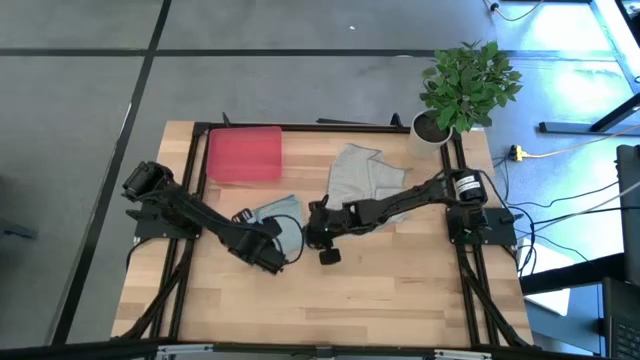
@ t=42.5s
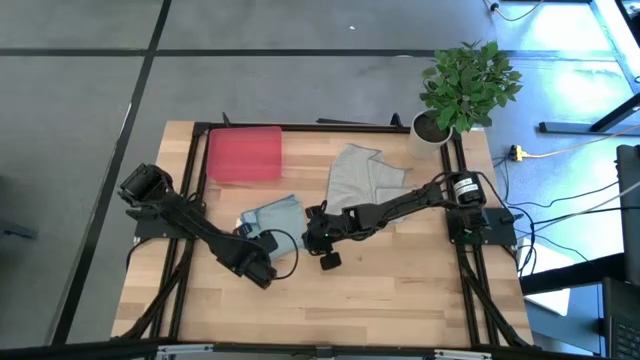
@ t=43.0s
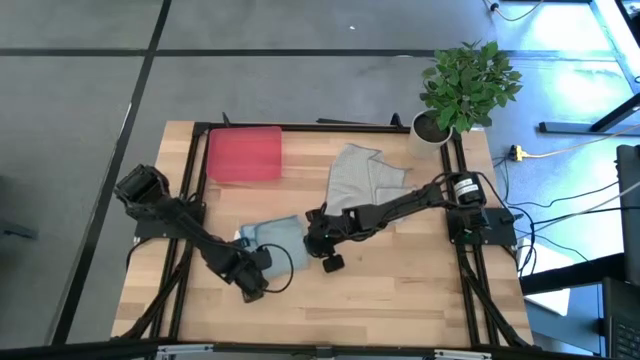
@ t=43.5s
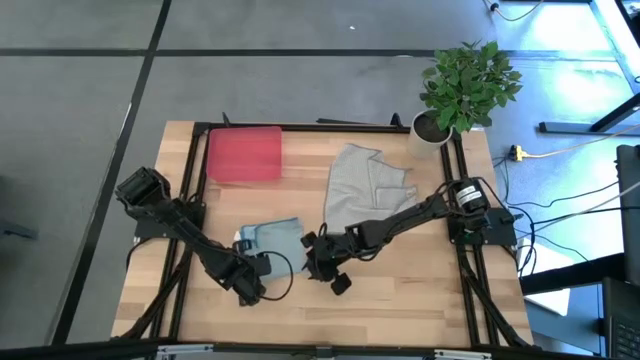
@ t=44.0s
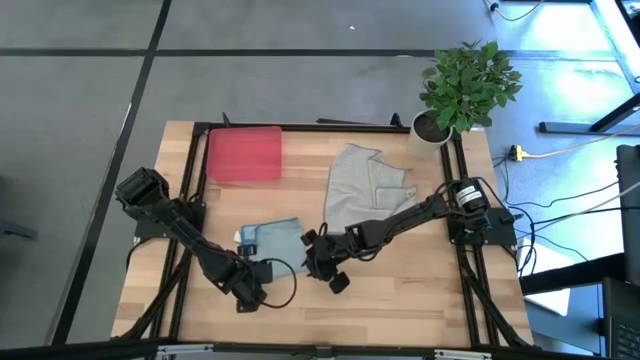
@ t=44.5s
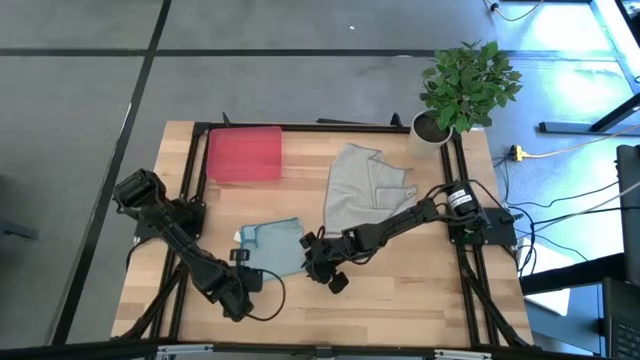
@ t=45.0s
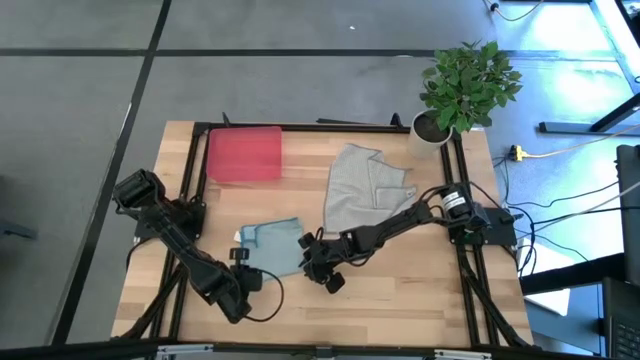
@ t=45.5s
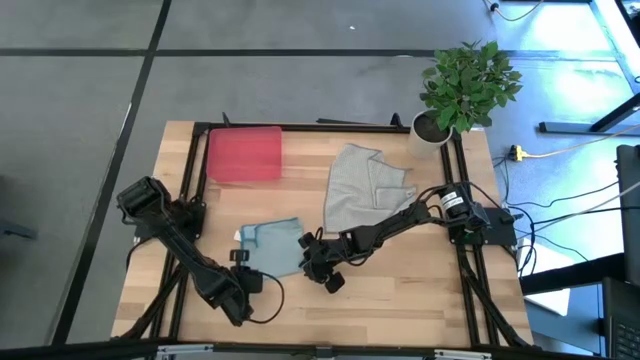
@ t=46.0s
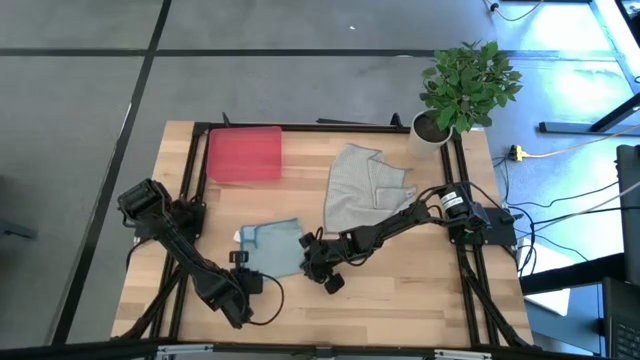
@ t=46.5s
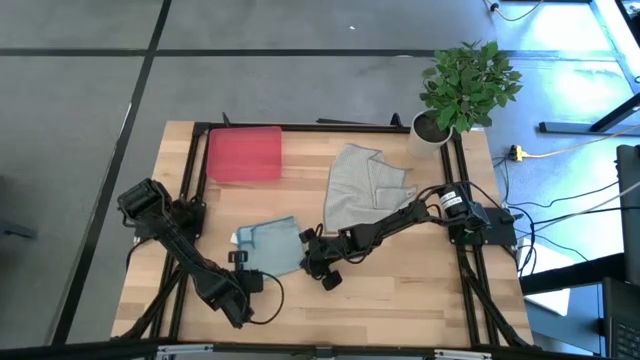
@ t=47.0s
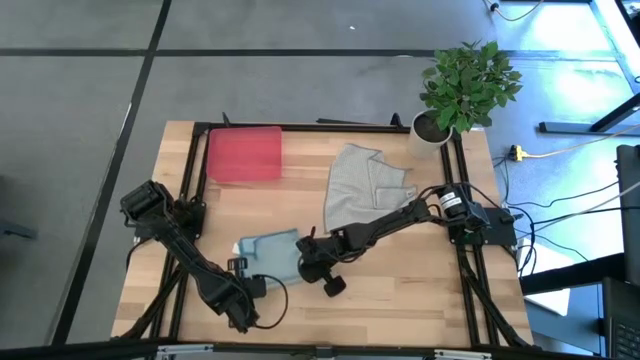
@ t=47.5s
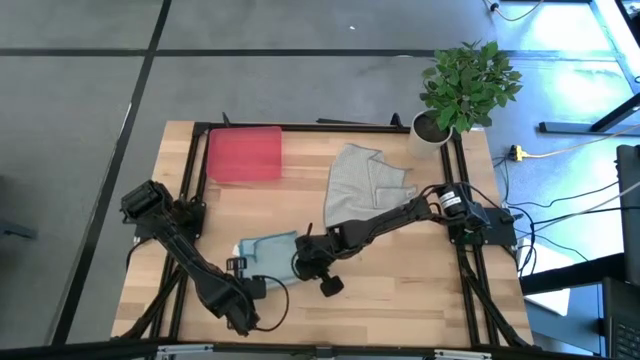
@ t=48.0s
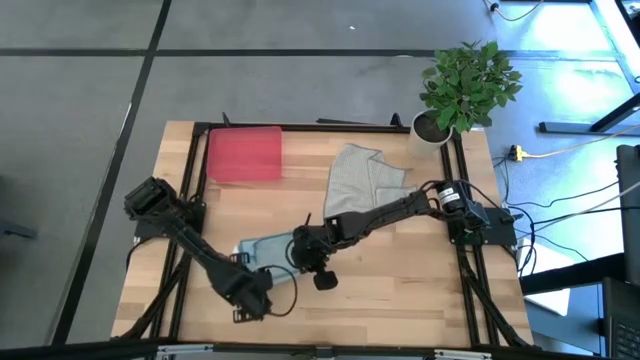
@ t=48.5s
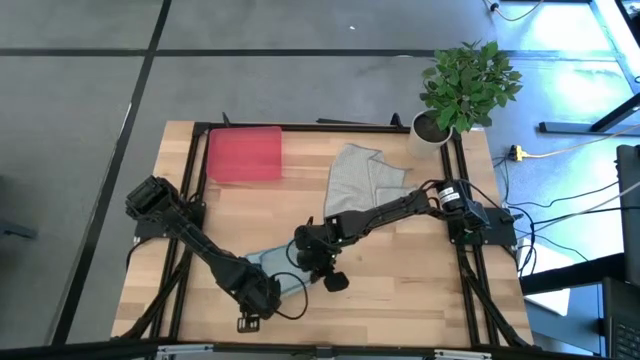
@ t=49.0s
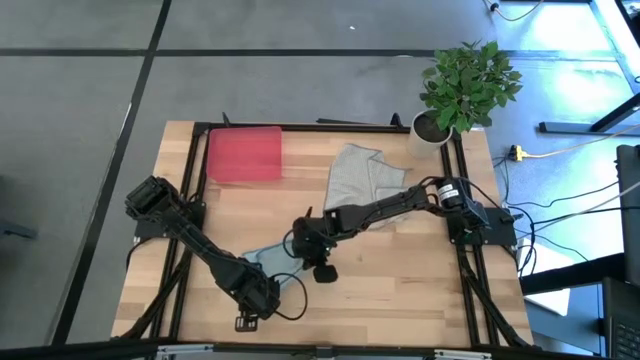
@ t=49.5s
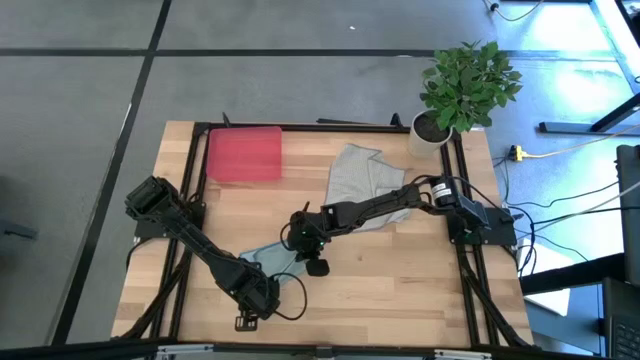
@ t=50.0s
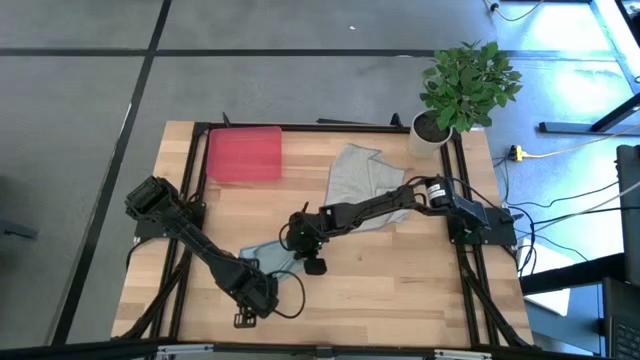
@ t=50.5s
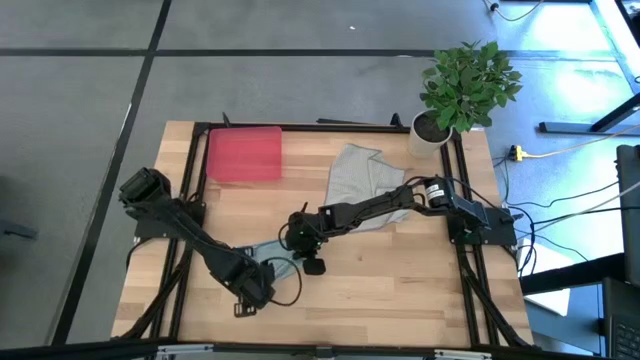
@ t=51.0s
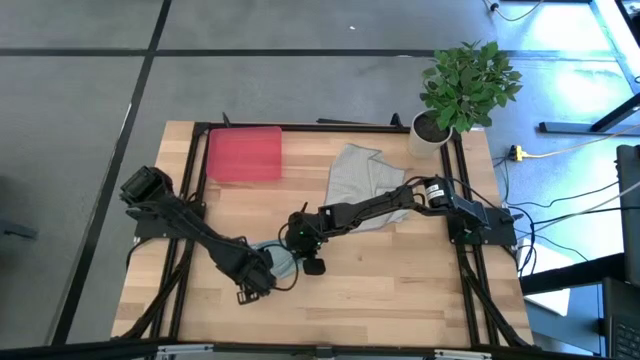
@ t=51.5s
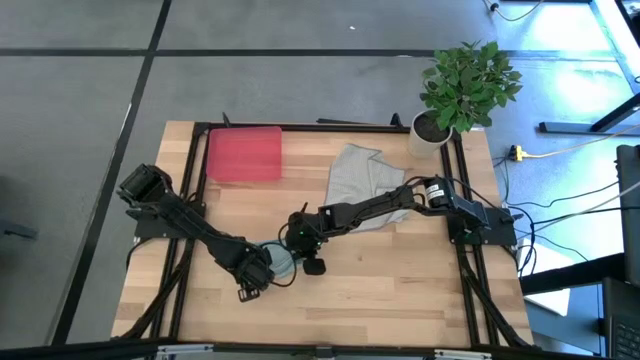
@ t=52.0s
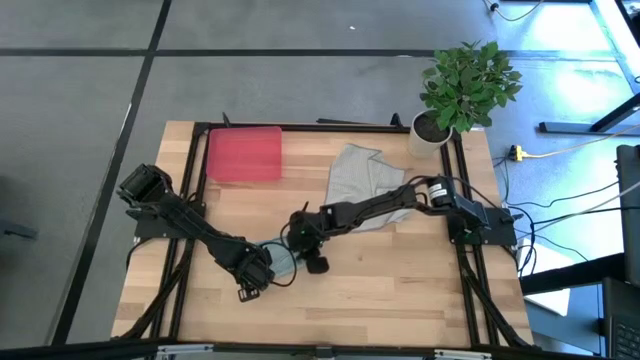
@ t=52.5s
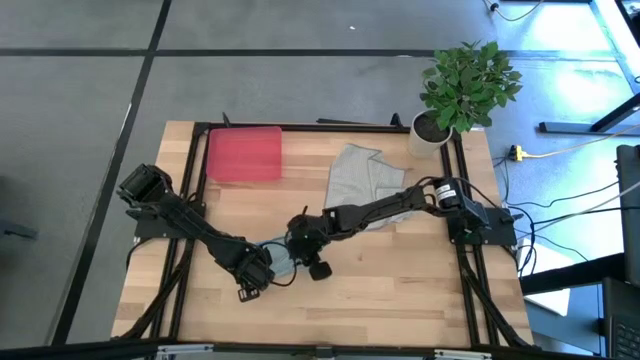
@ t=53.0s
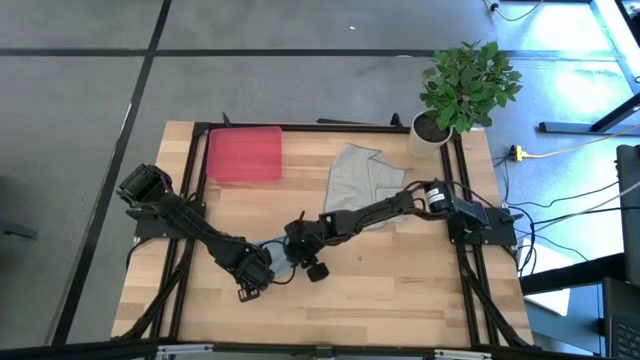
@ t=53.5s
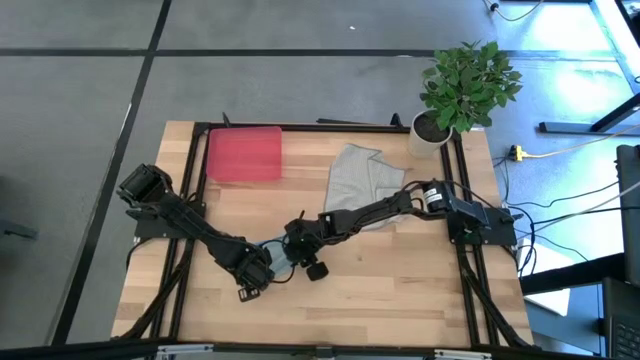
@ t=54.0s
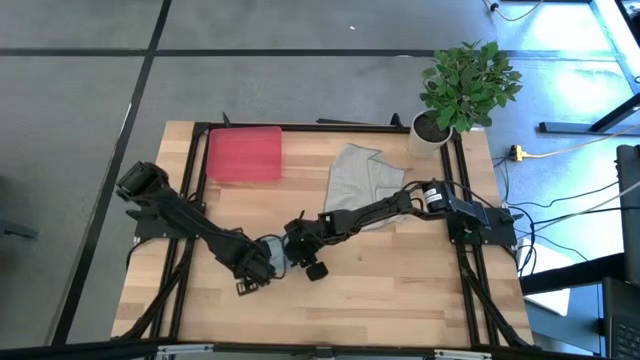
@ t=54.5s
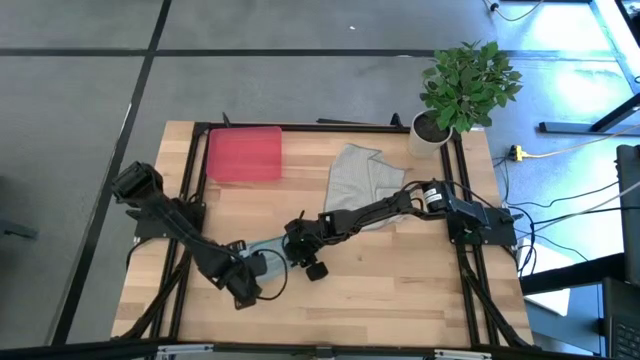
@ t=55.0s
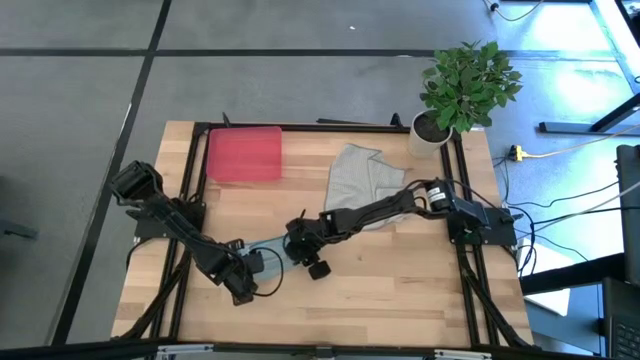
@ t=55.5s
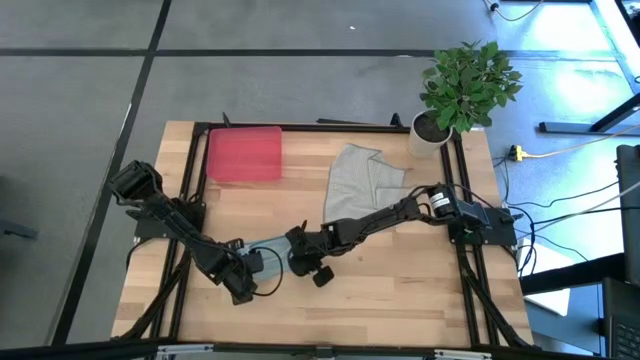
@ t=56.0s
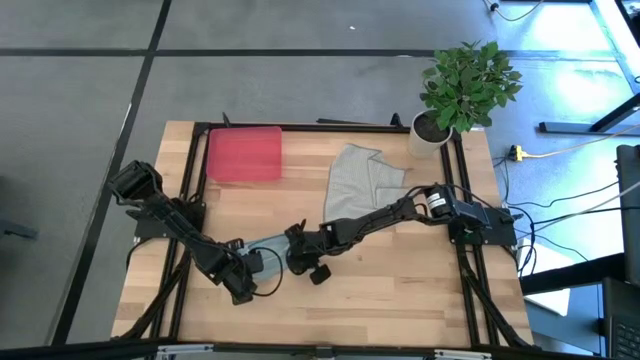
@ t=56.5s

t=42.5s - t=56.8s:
Task: Roll microfiber towels into tight, uniform cylinder then place into a basket
Roll the blue towel

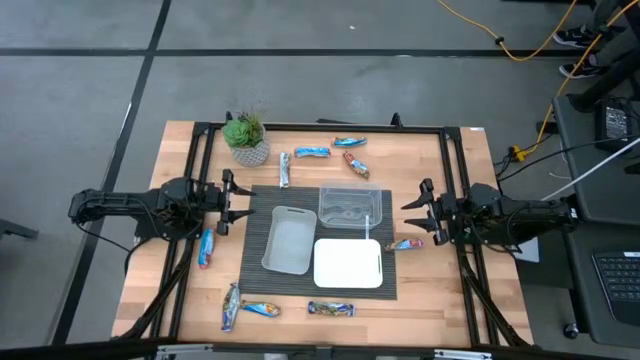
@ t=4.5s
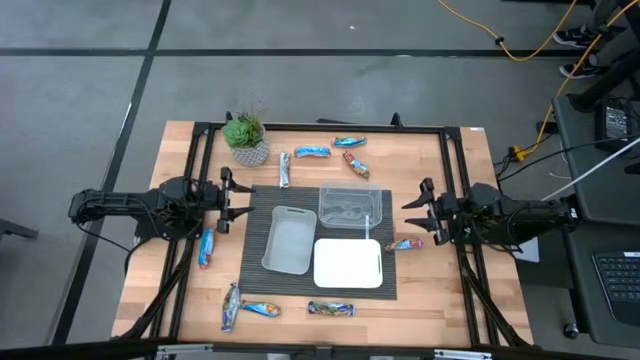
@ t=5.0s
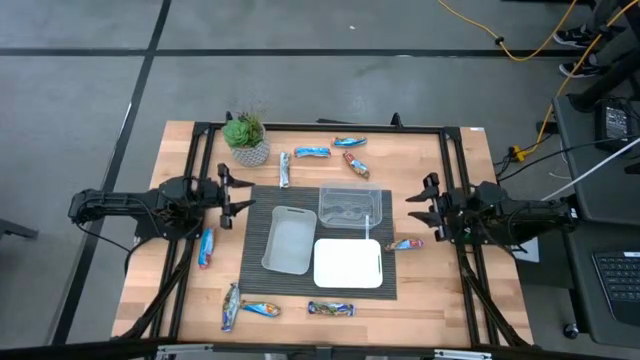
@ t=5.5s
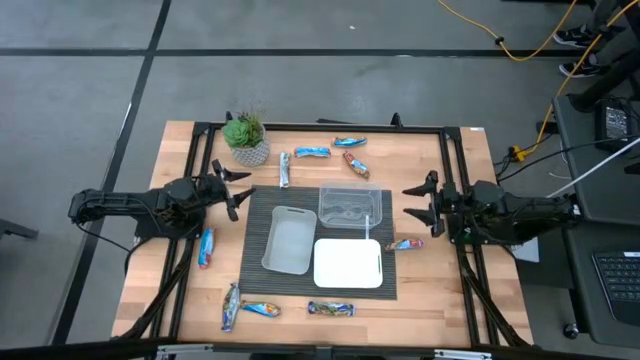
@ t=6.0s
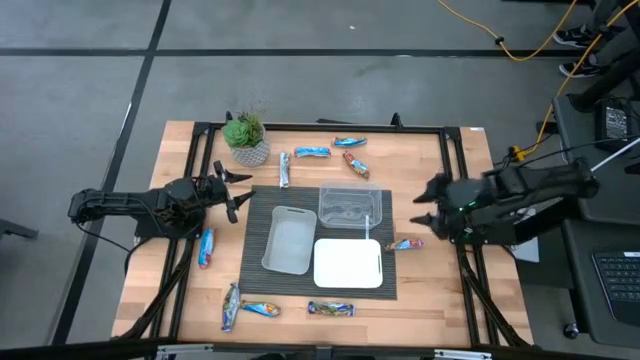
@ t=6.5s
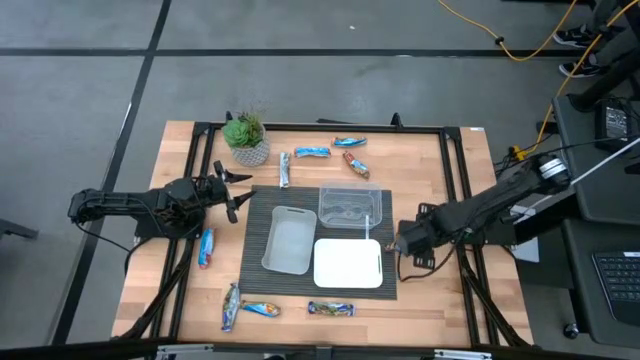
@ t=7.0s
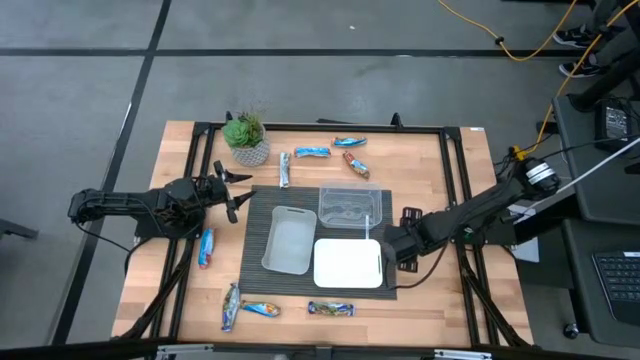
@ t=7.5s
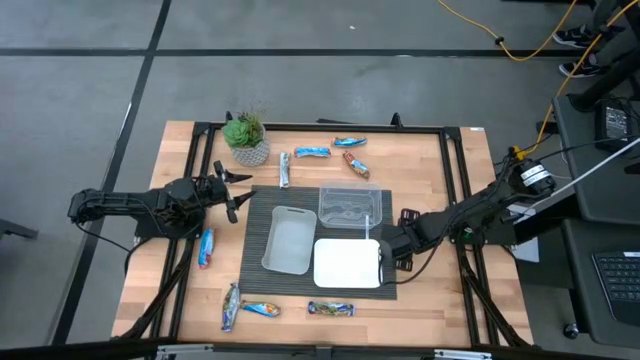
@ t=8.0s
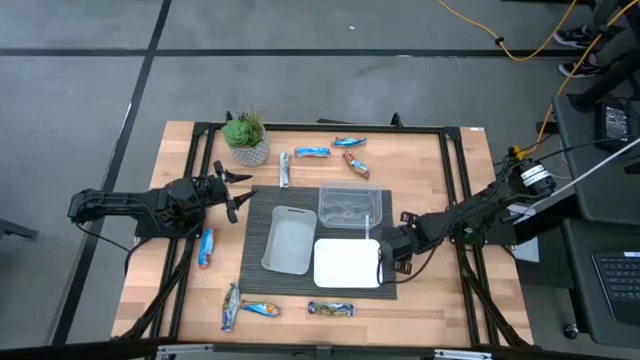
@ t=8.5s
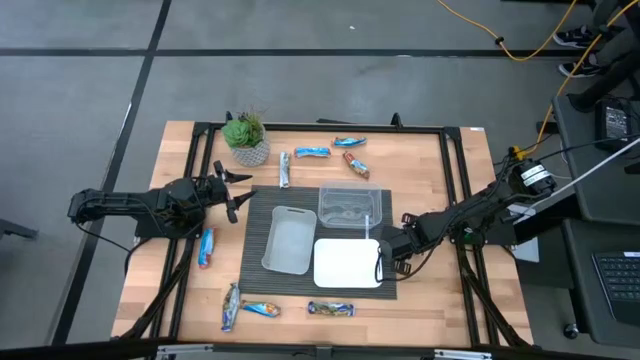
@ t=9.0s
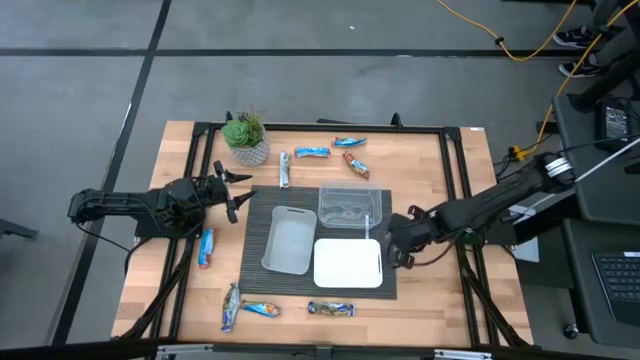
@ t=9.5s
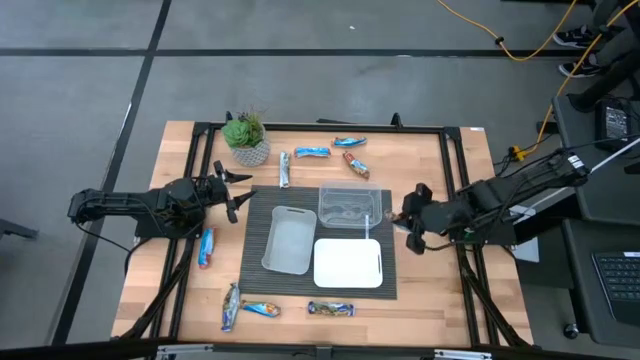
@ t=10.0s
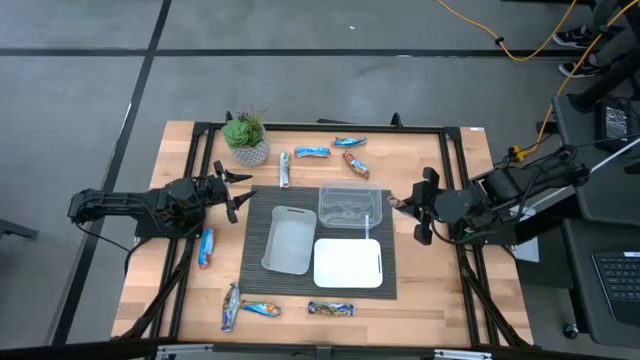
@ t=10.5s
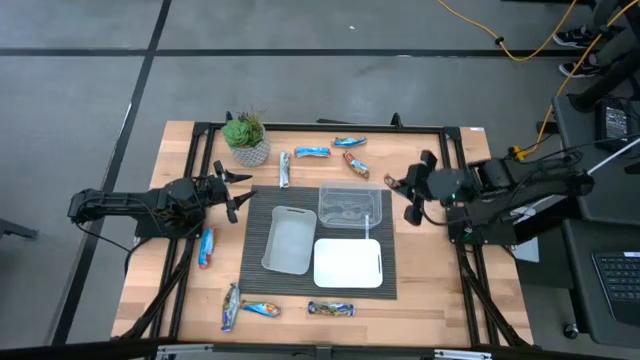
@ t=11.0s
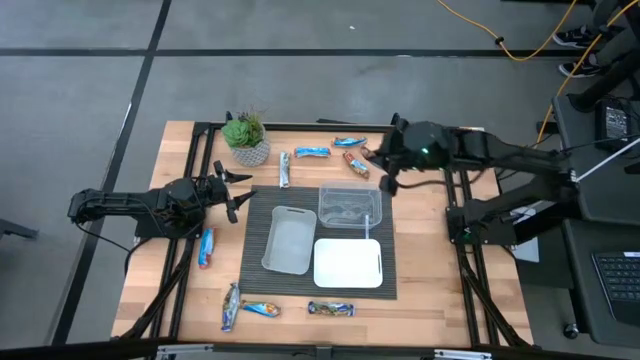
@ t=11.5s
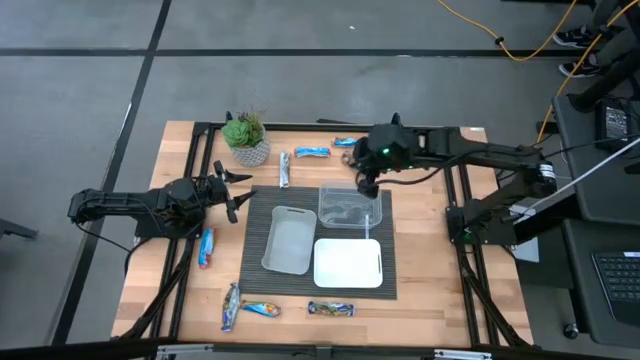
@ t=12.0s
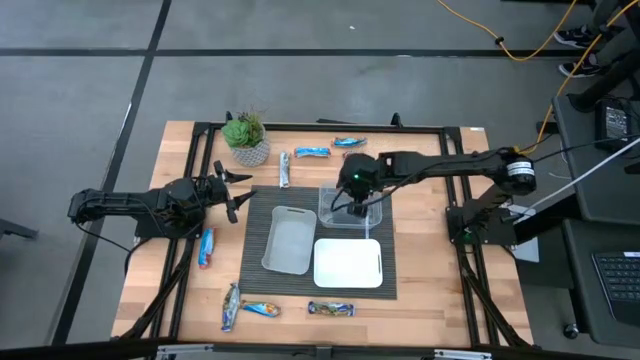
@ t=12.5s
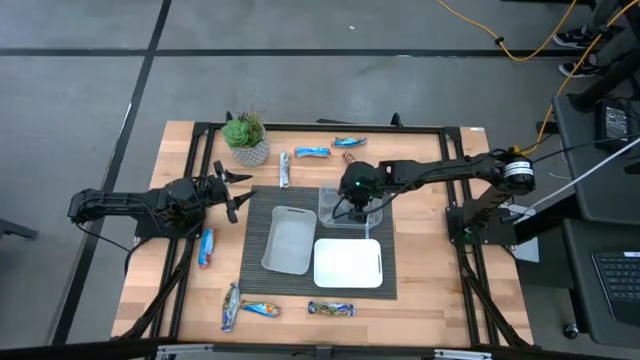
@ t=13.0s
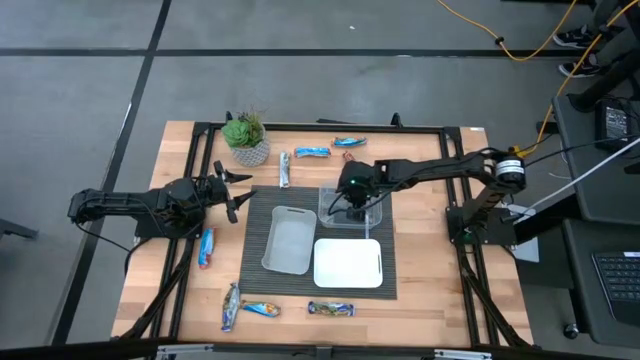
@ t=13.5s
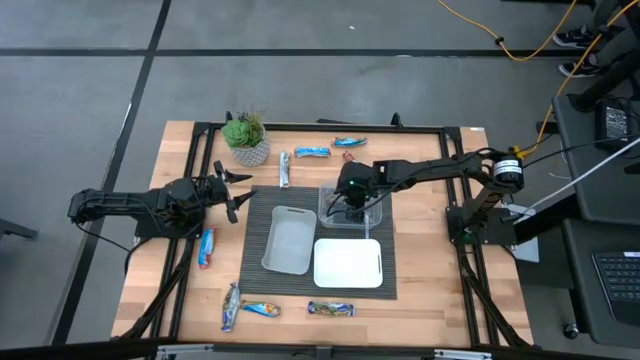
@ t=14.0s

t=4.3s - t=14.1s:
Task: Pick and place Granola Bars by type
Put the red granola bar into the transparent bin
